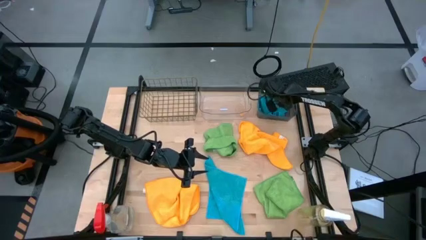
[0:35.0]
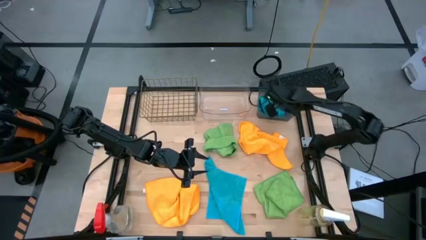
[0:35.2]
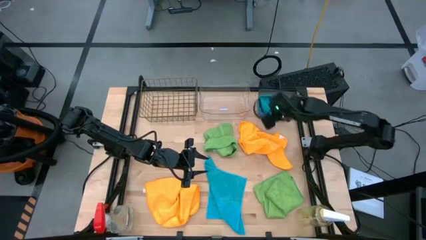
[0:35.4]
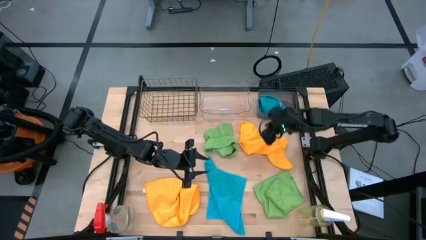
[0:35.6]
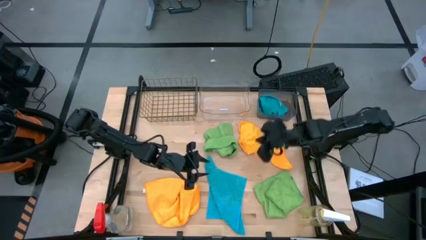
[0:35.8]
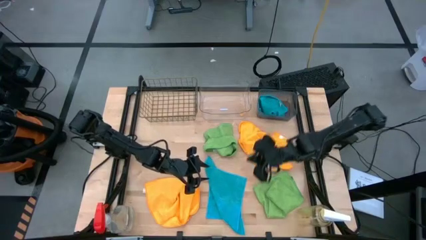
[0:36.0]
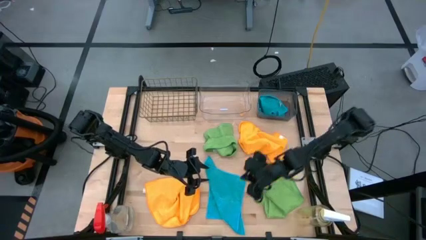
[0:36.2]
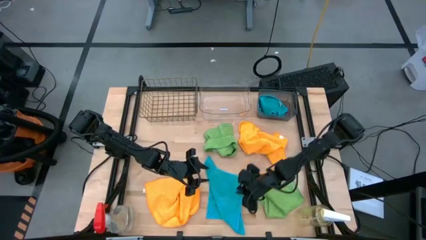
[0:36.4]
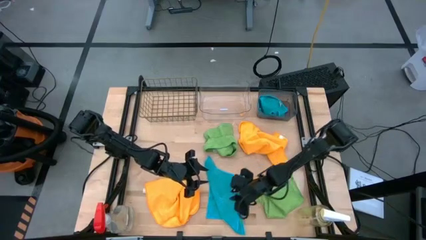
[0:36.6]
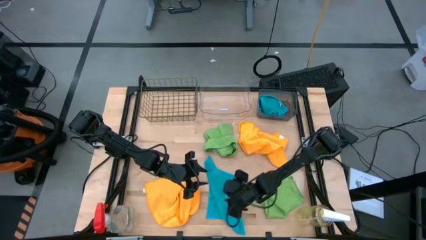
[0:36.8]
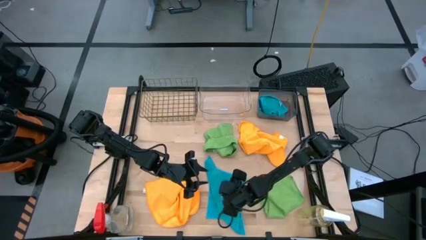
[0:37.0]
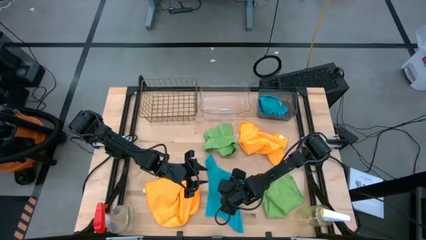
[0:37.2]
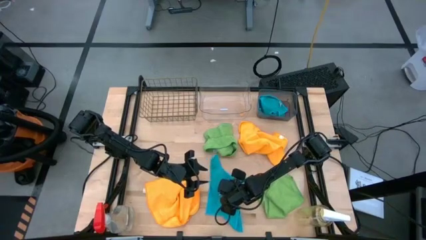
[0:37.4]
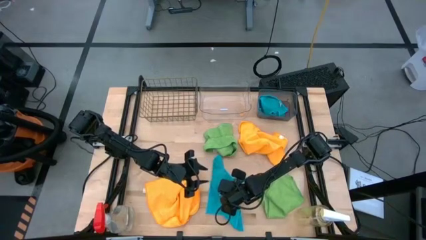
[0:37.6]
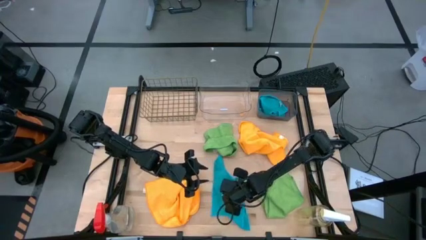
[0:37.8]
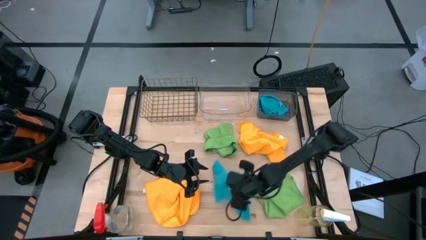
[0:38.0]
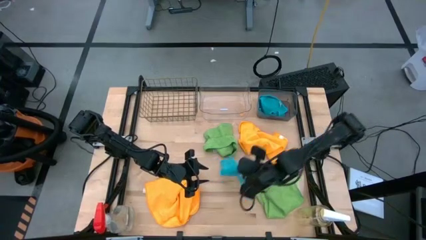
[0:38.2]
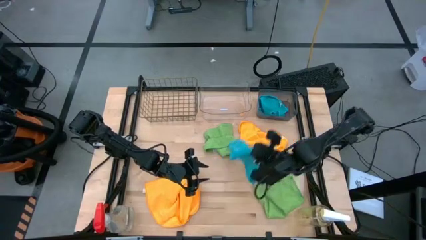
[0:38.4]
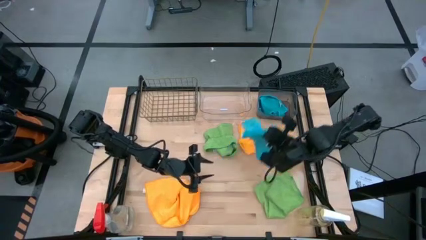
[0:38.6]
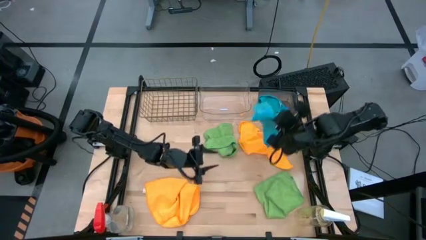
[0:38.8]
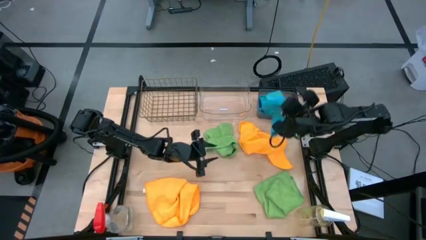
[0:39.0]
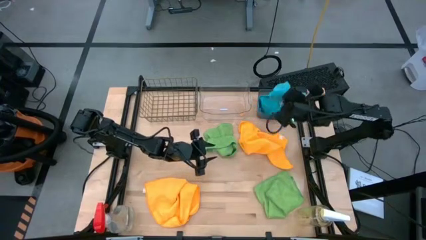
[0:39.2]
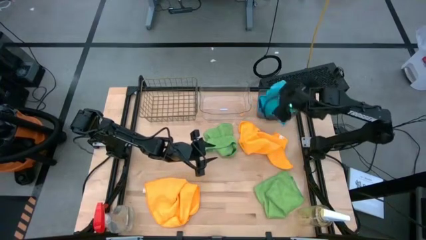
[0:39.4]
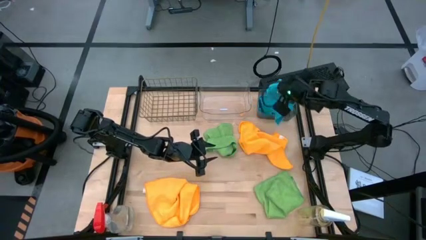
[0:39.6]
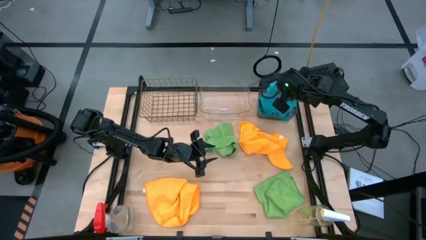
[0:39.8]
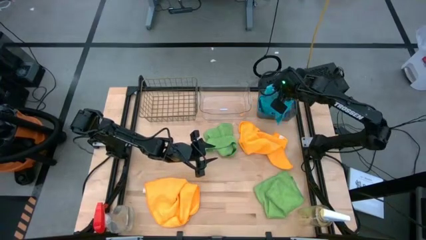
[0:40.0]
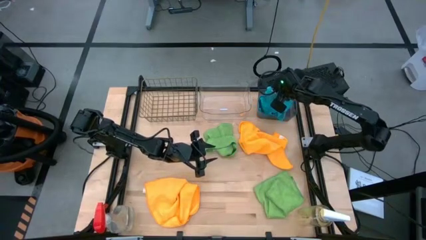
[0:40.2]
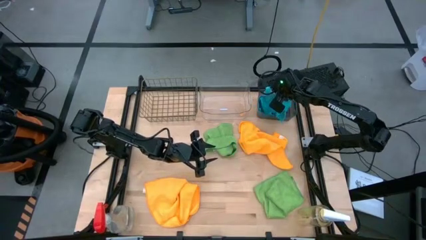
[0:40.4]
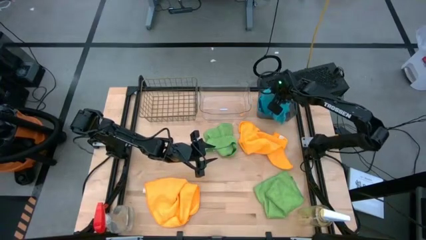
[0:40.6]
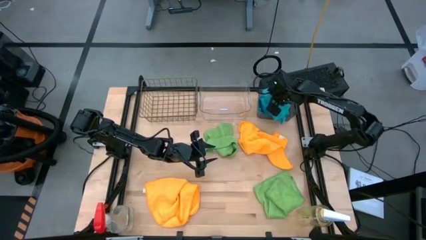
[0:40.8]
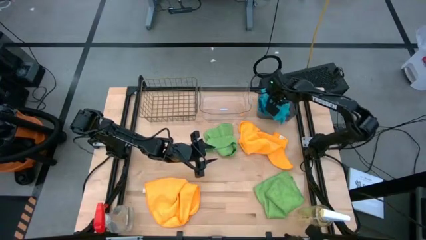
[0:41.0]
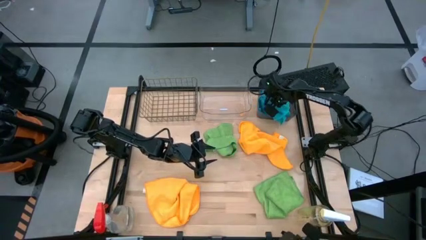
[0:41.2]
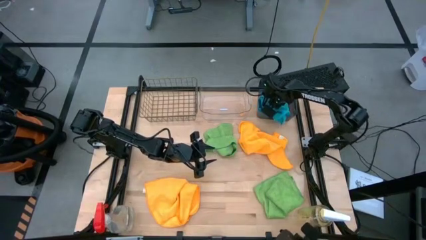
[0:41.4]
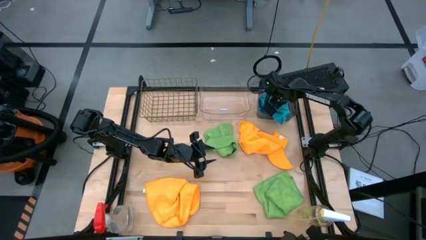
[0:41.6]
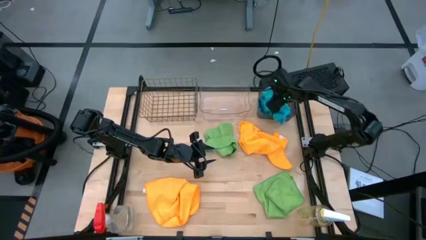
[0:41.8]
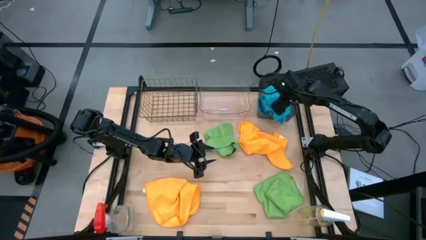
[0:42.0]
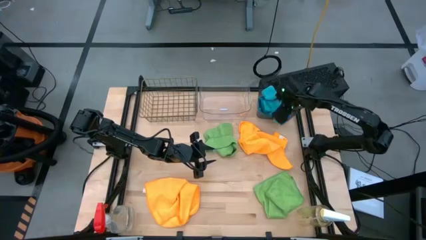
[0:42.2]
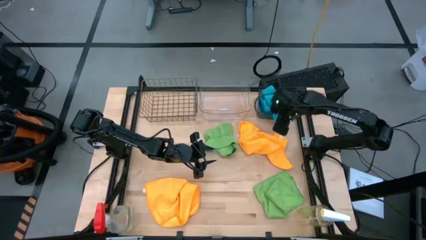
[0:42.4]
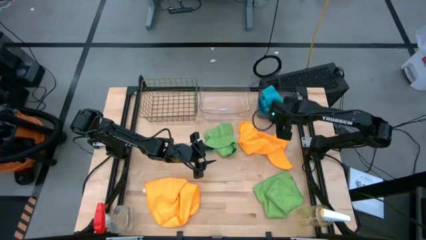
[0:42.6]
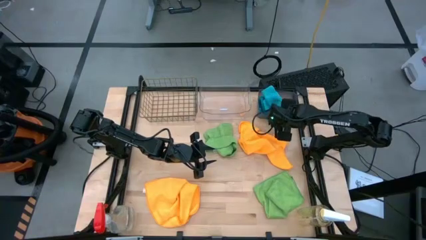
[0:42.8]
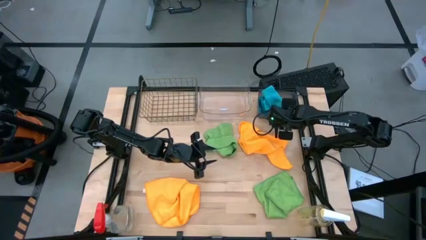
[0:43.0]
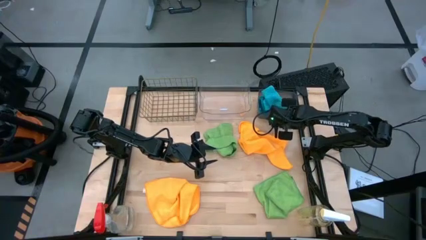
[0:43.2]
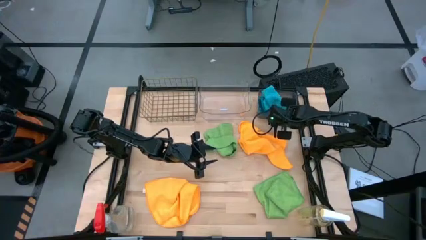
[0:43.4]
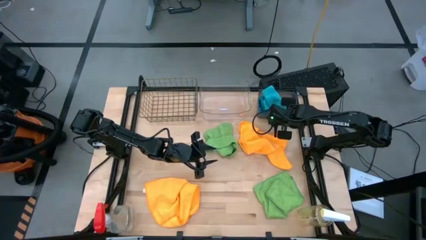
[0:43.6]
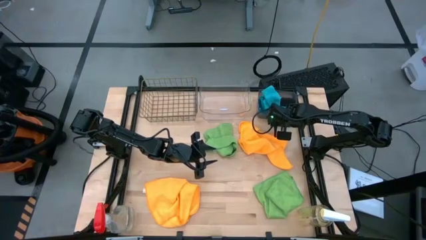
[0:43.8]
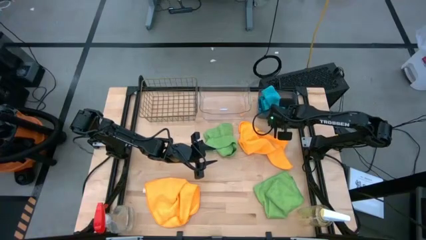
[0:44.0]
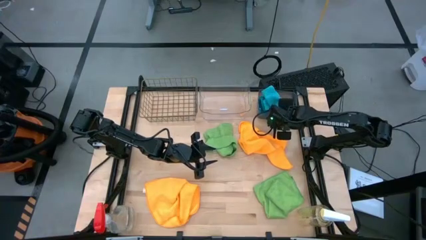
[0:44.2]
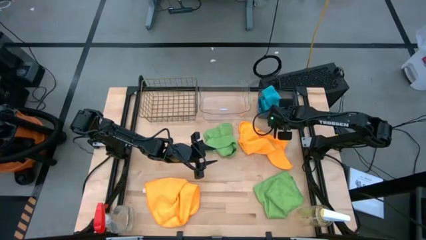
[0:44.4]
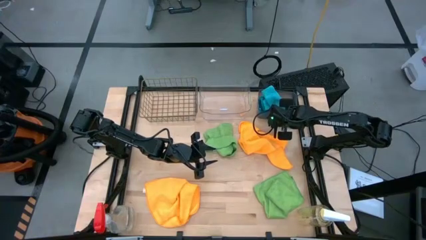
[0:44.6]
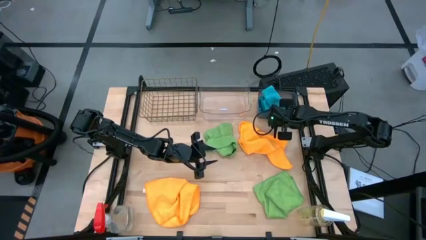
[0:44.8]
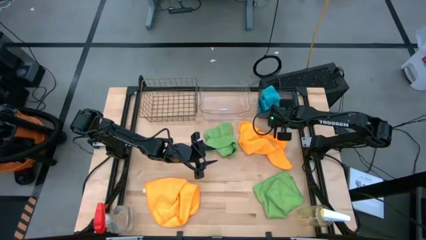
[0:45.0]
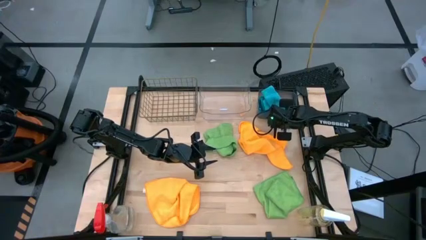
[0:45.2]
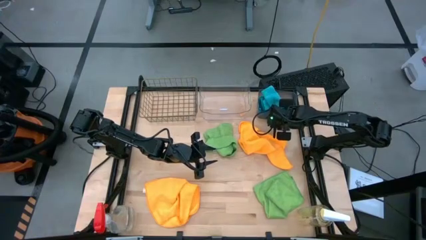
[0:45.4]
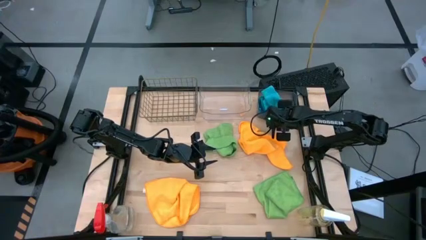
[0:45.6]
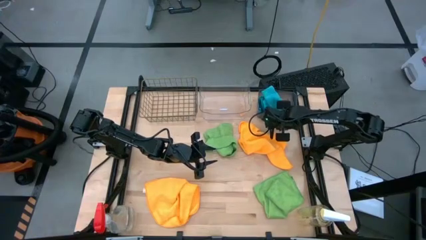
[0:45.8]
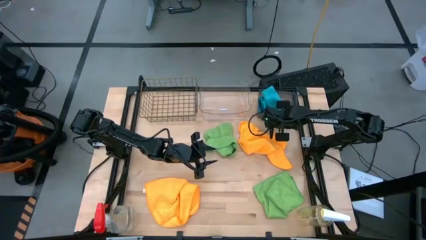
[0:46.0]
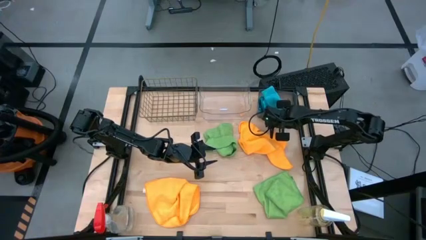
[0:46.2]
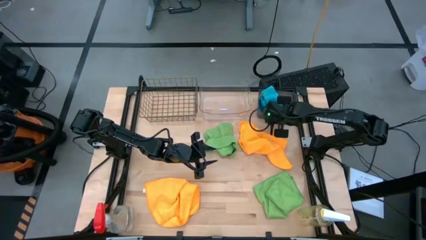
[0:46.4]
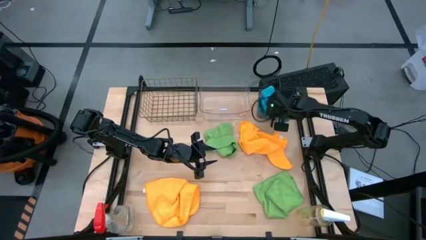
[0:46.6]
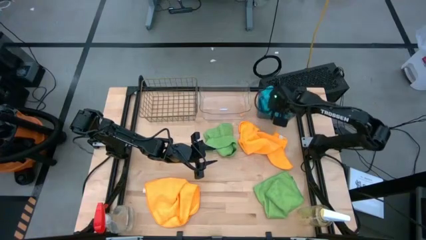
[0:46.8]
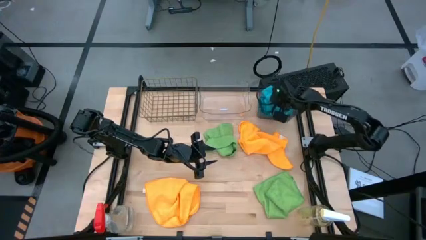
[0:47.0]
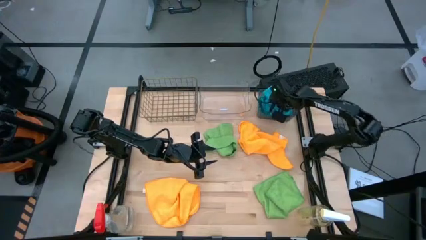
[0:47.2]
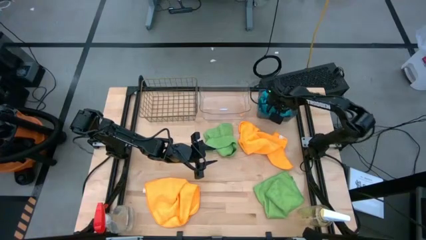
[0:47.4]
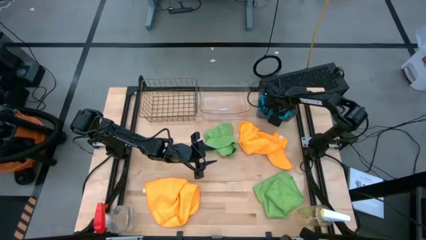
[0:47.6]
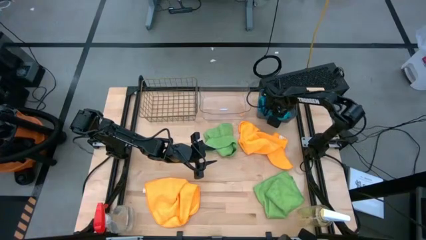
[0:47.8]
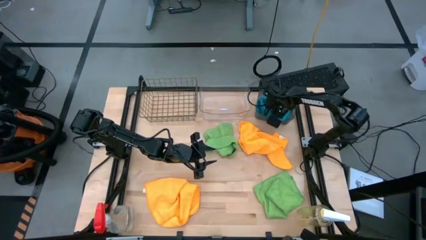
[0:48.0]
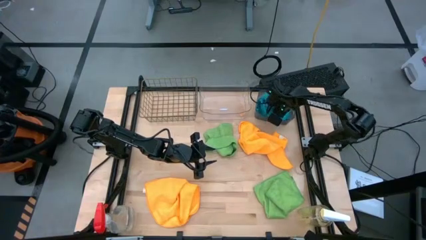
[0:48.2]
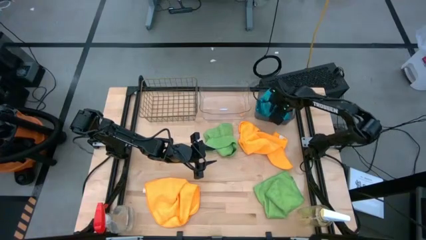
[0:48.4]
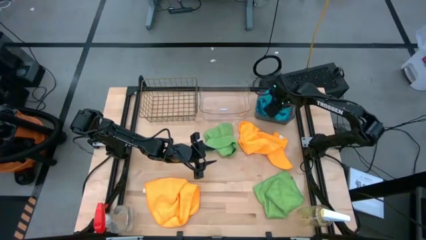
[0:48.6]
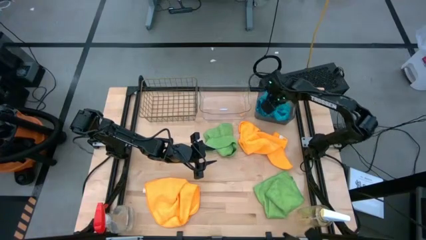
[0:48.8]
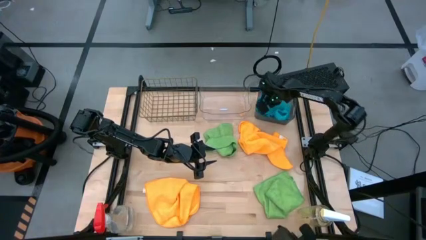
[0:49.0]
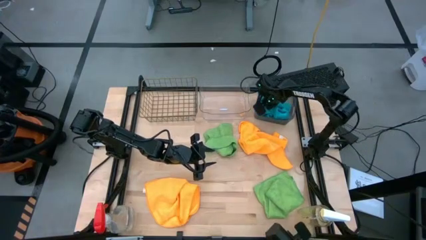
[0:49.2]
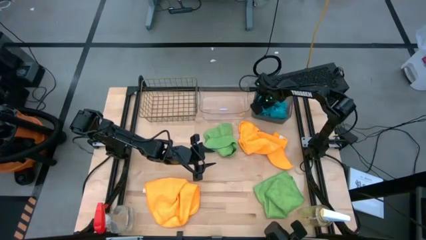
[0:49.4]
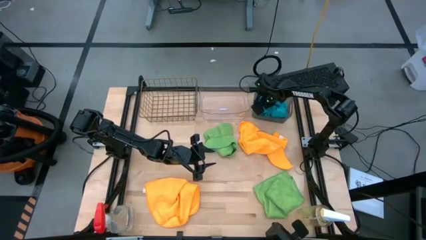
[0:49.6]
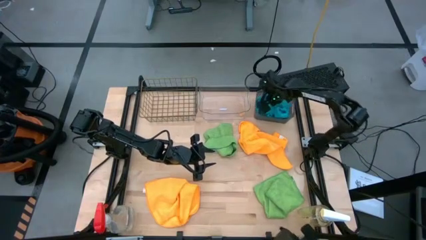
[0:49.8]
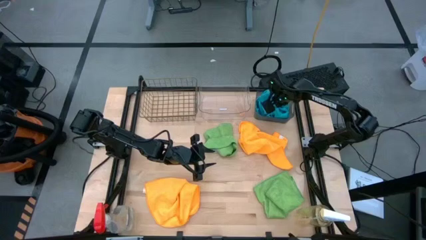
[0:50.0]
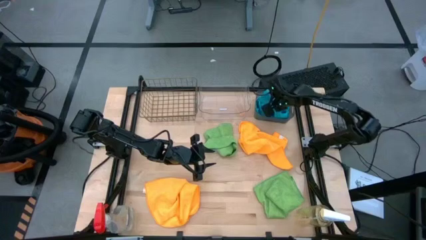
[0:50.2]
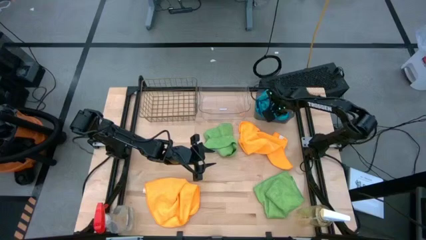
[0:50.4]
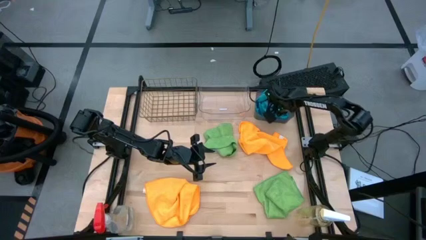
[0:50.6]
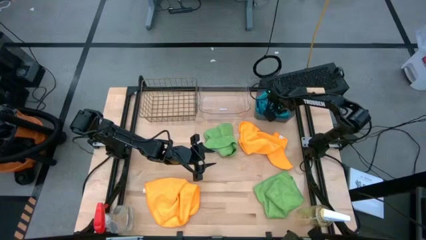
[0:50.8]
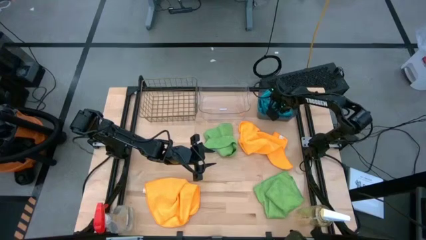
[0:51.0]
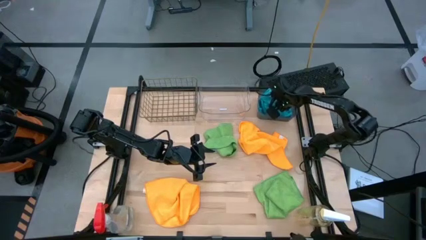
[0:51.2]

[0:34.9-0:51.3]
Task: Sort microfiber towel by color & place in baskets
Put the blue microfiber towel into the black bin
